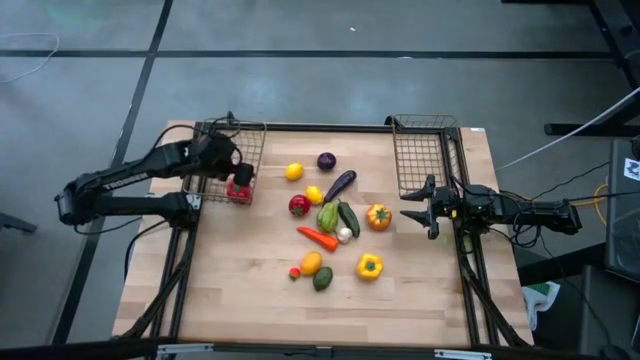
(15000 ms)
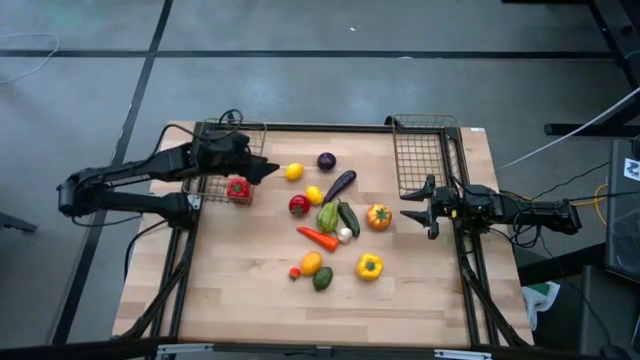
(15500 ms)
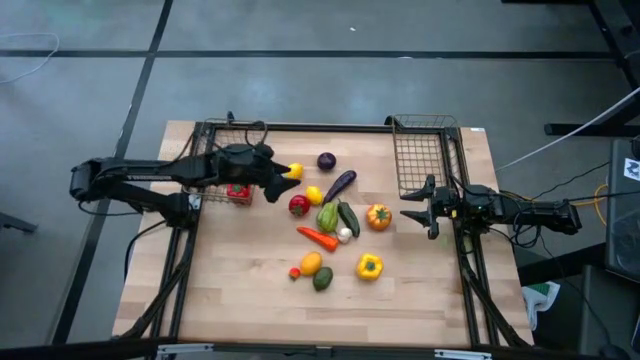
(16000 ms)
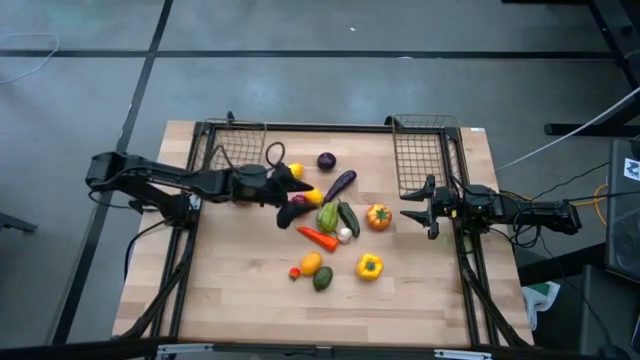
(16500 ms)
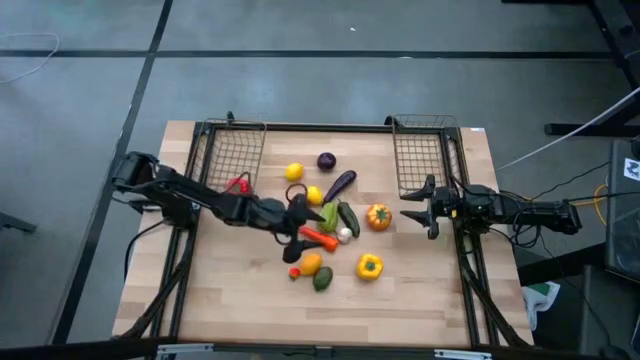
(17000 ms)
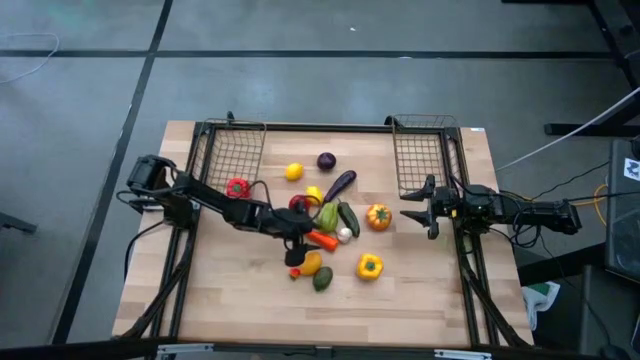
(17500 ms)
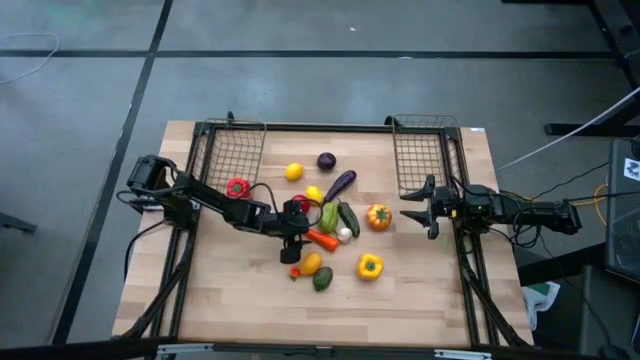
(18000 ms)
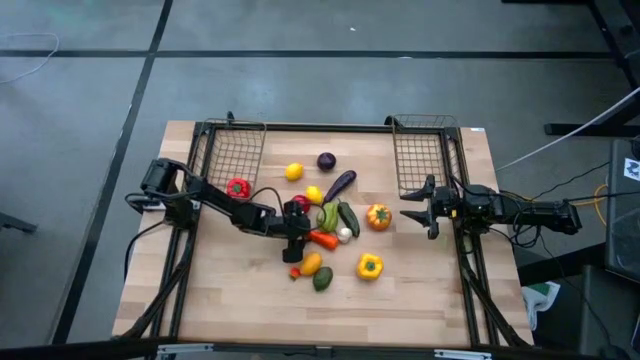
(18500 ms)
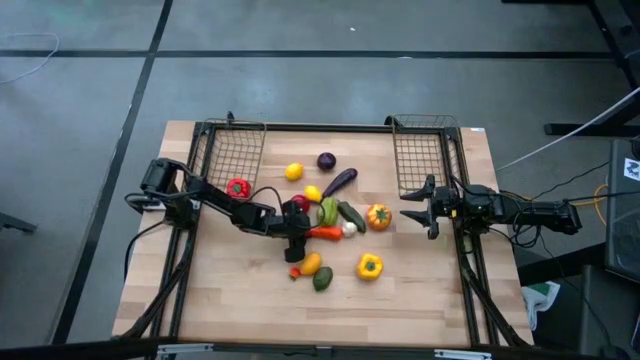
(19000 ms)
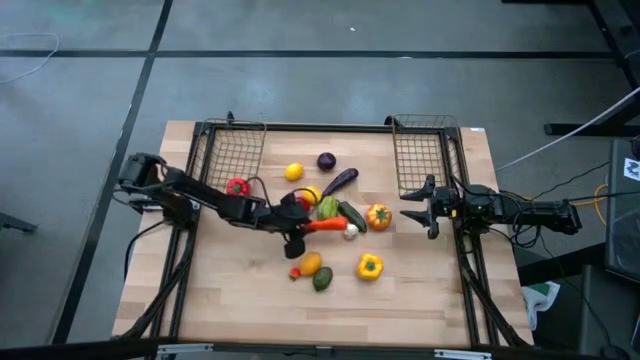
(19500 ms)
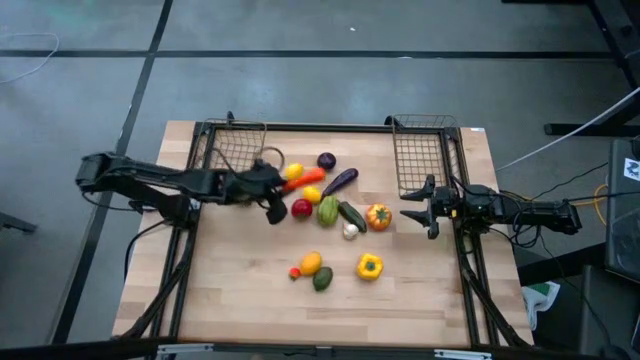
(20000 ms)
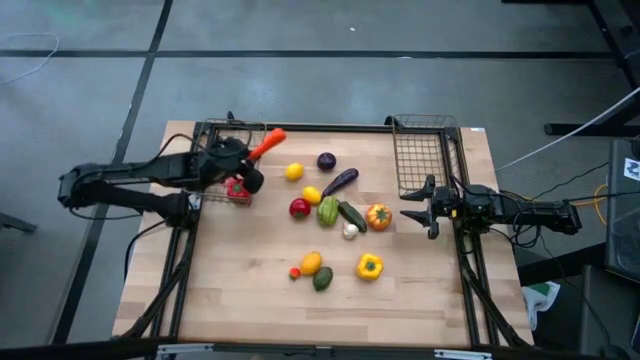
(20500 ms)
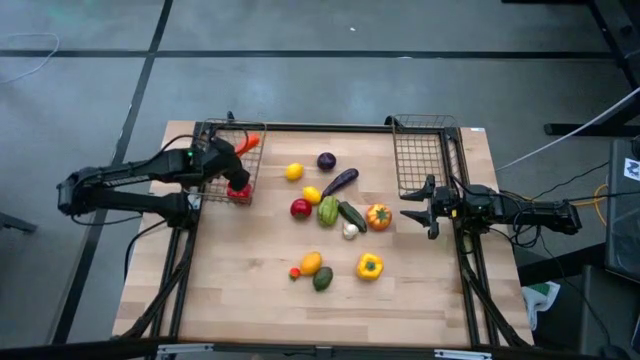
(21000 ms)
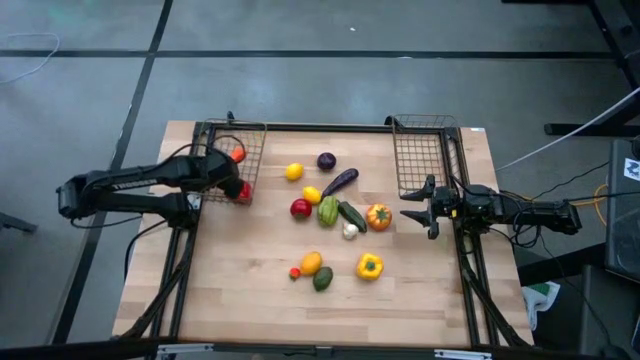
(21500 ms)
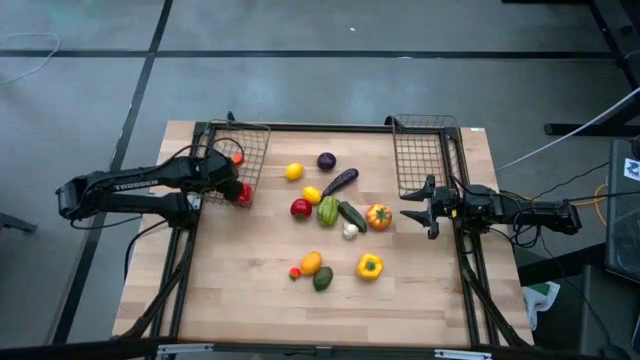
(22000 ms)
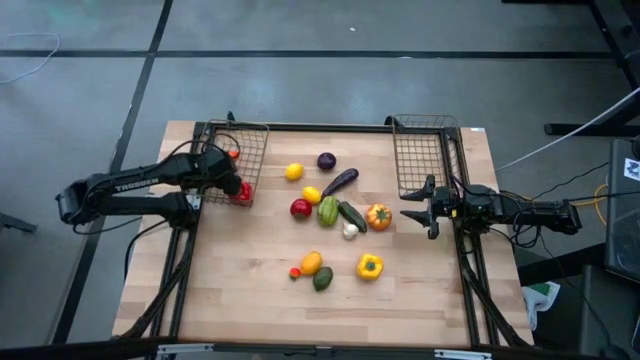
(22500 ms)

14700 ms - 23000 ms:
Task: Sort produce into baskets
Put the orange carrot into the left gold wire basket

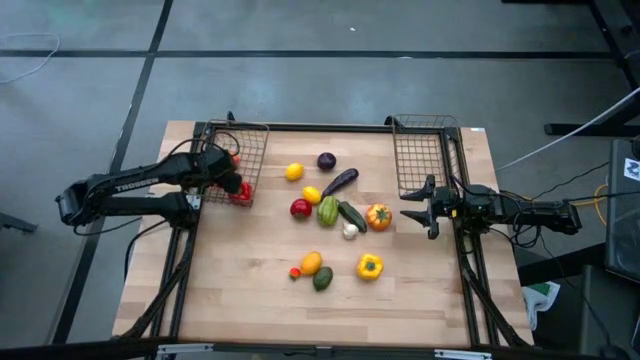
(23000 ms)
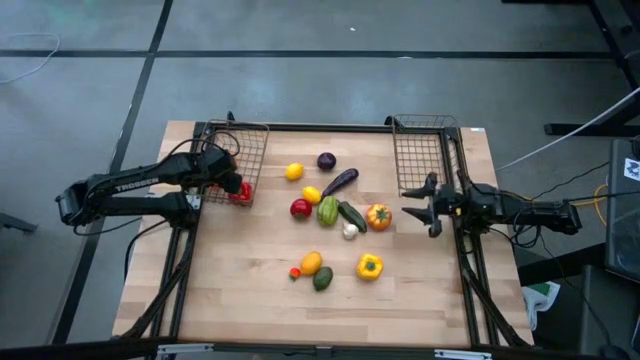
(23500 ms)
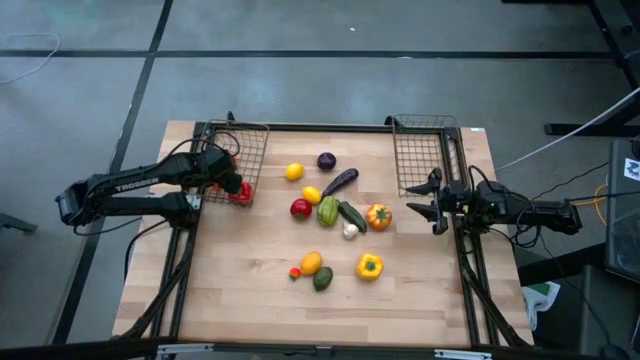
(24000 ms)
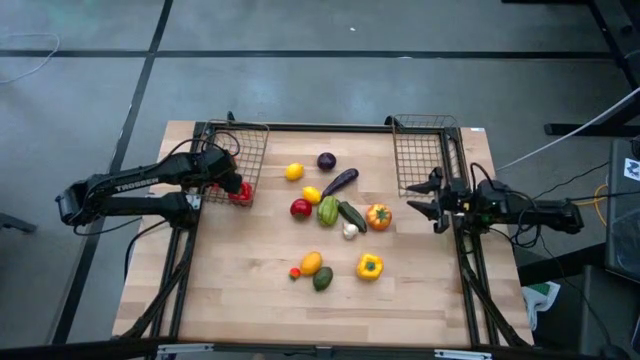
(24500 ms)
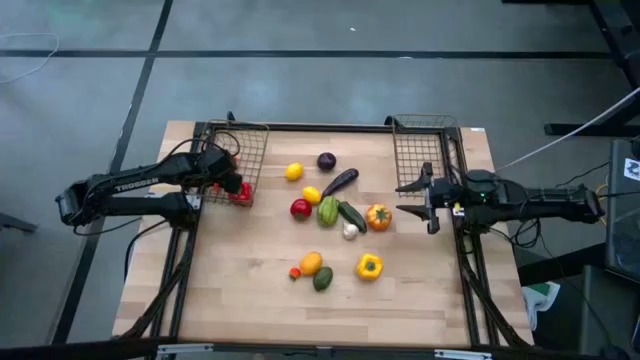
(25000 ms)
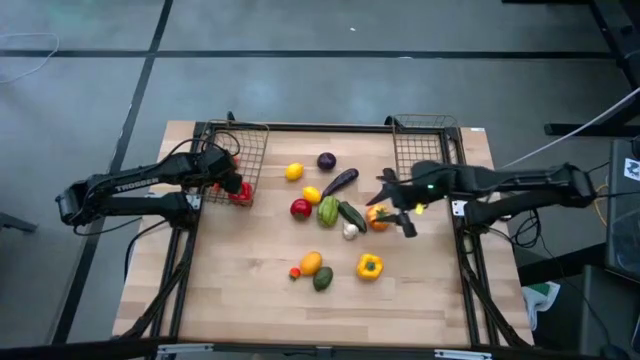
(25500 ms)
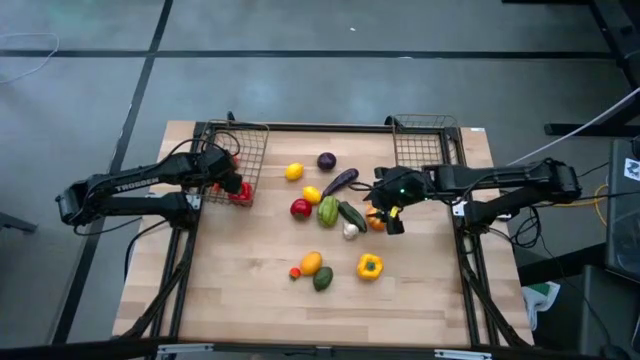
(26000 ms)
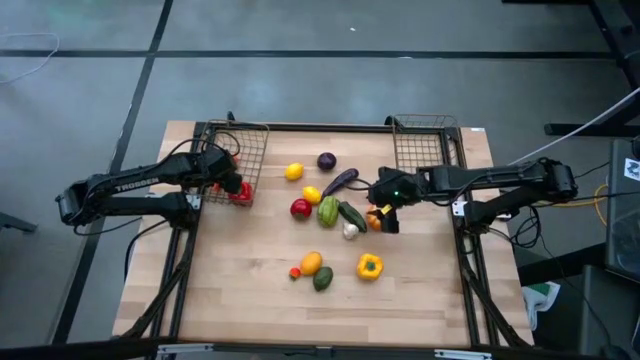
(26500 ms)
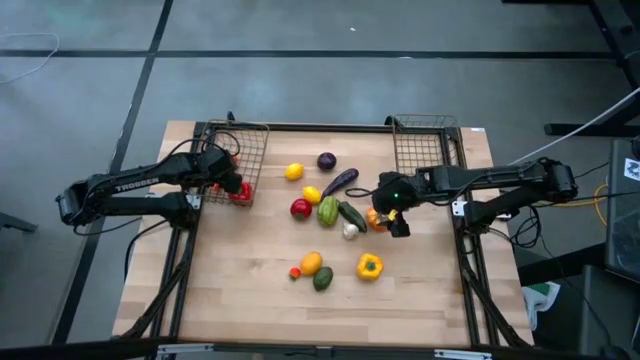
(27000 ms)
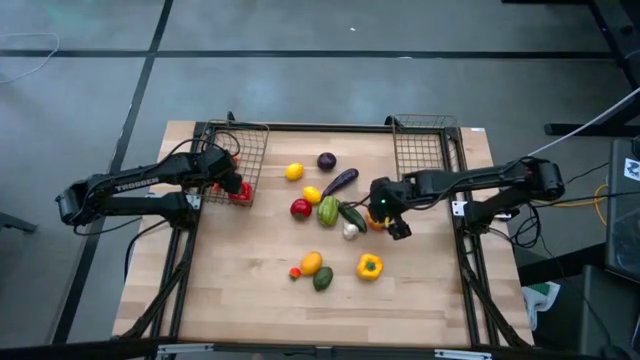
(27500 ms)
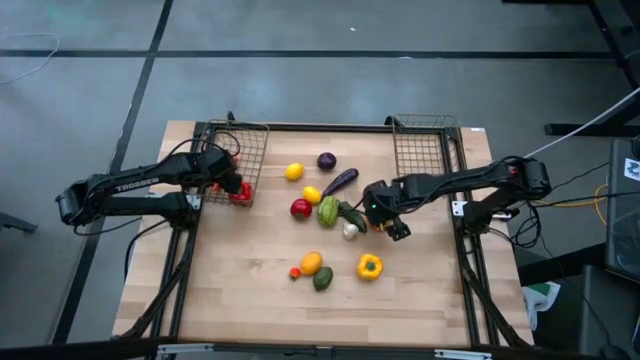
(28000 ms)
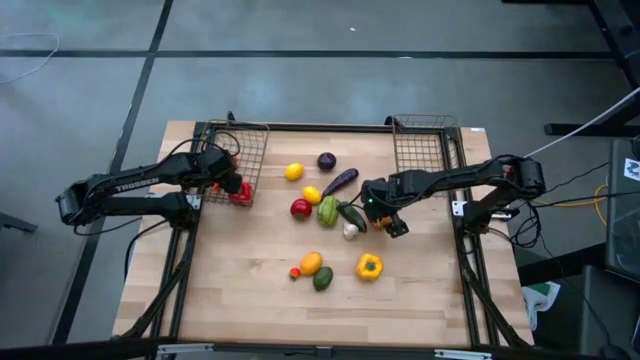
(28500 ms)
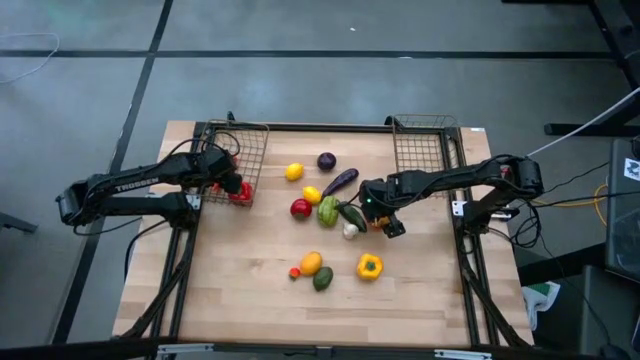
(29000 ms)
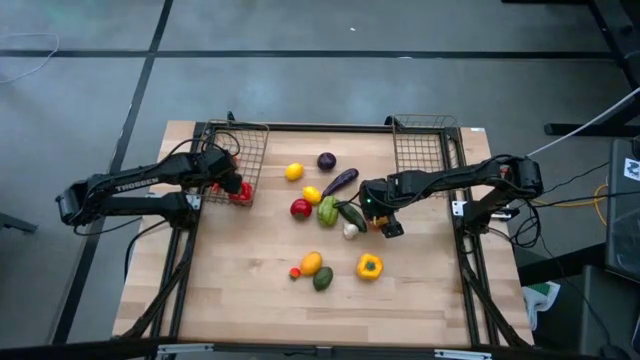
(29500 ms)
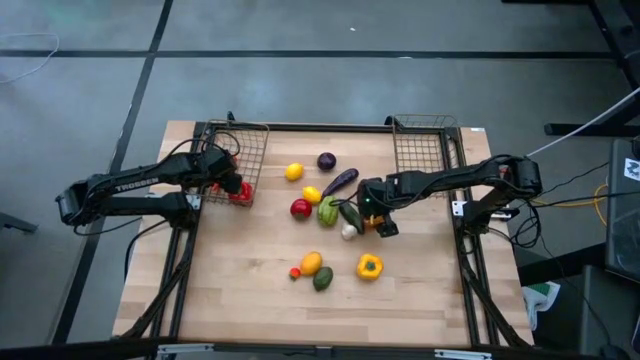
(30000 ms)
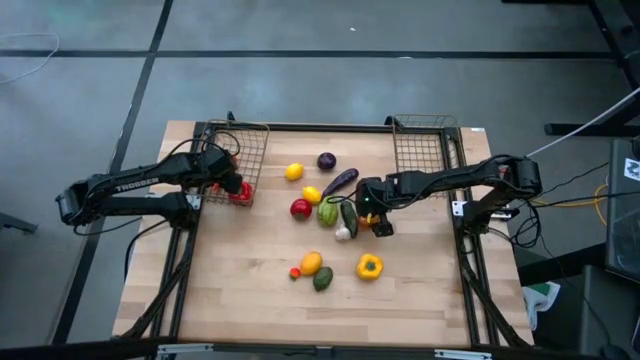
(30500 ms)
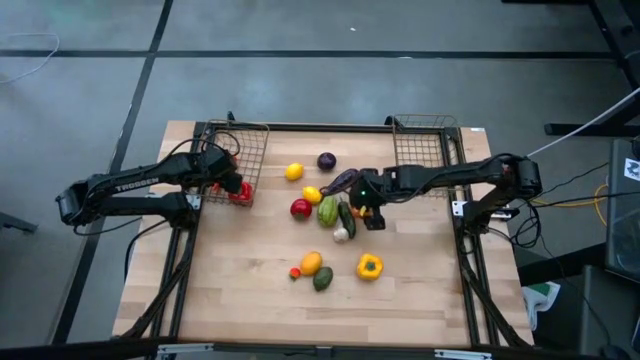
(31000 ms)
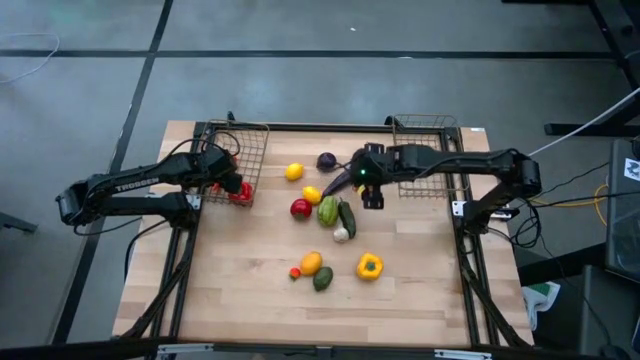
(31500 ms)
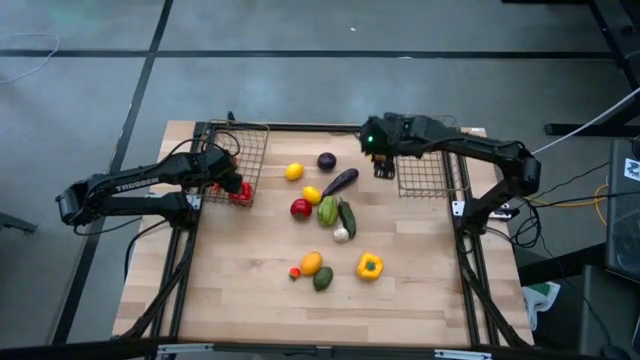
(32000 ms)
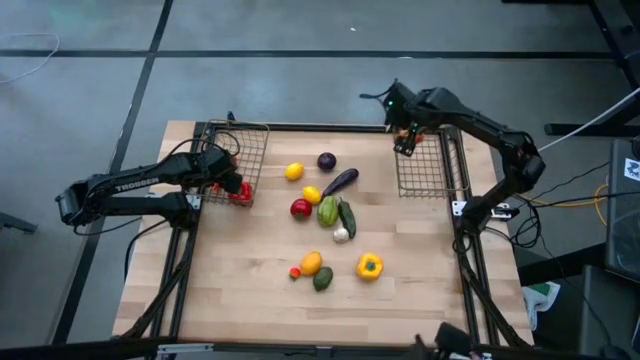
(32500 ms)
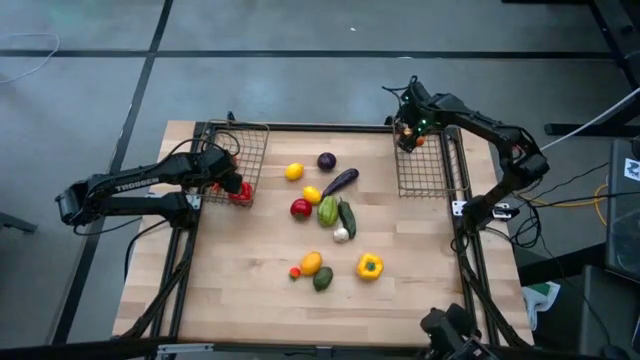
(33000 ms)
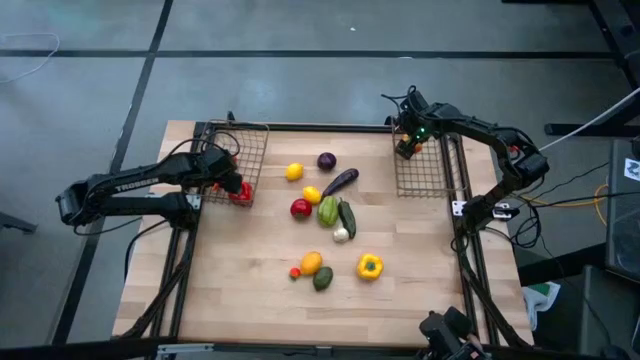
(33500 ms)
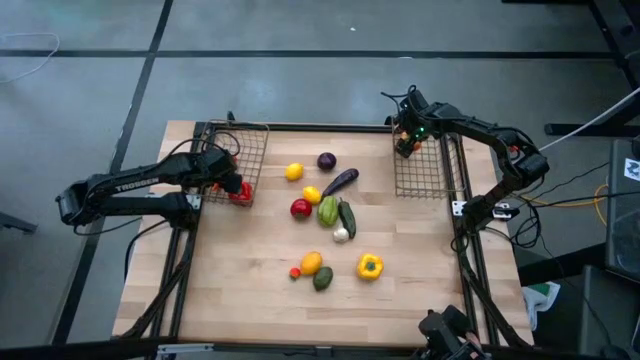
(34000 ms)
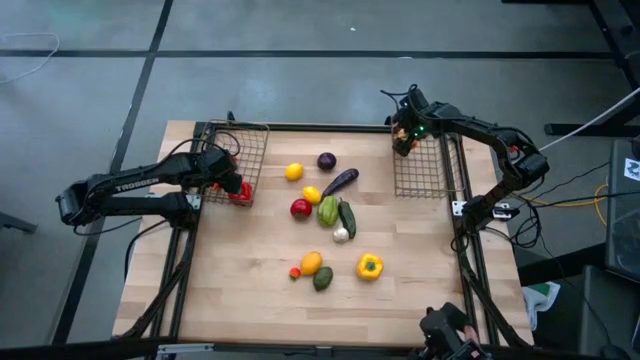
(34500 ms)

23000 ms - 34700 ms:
Put the yellow tomato into the right gold wire basket

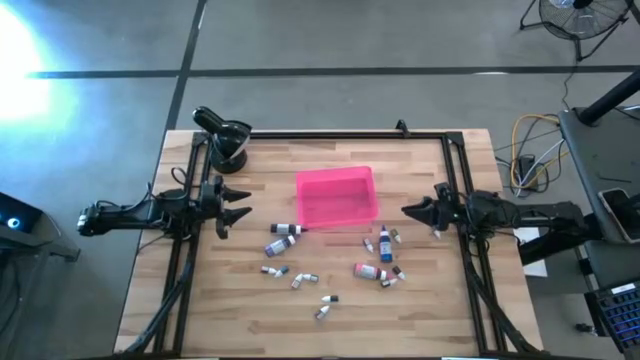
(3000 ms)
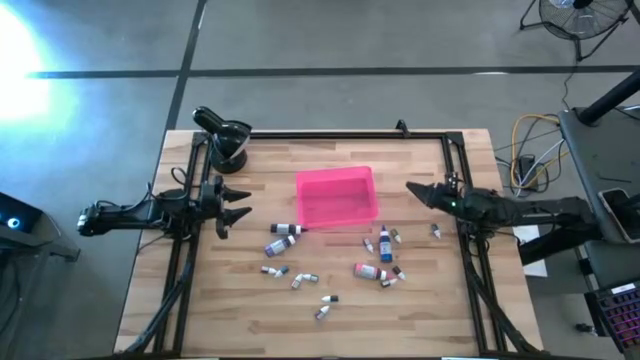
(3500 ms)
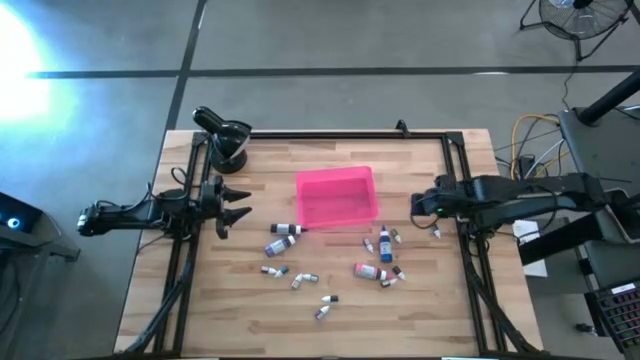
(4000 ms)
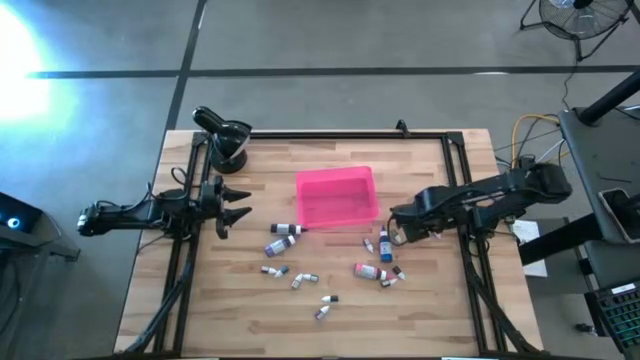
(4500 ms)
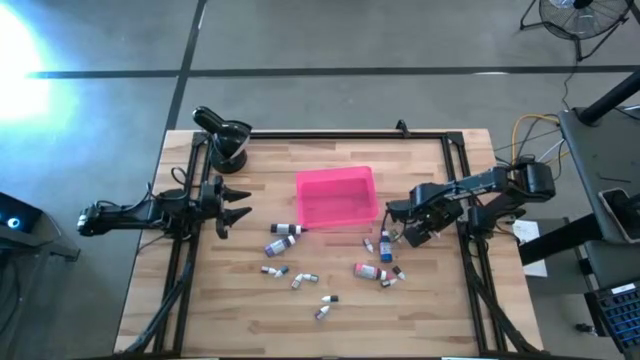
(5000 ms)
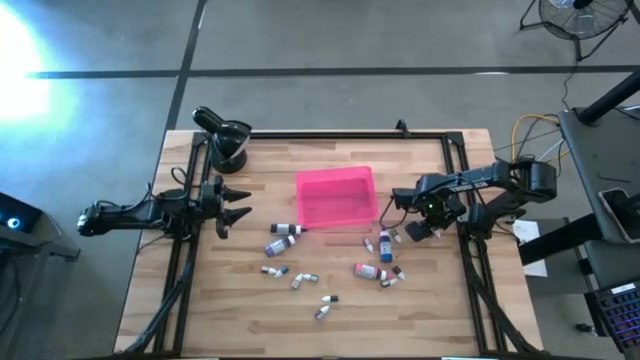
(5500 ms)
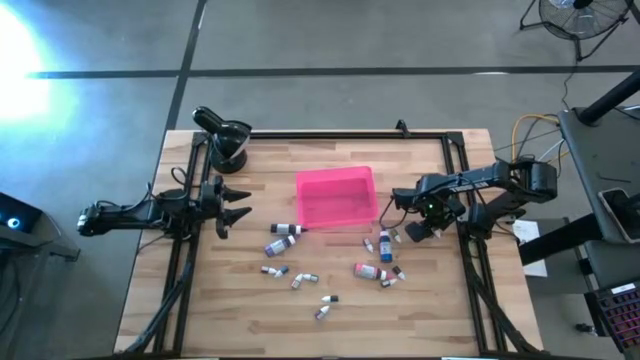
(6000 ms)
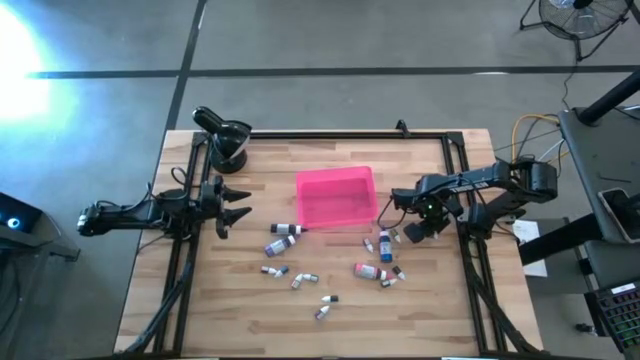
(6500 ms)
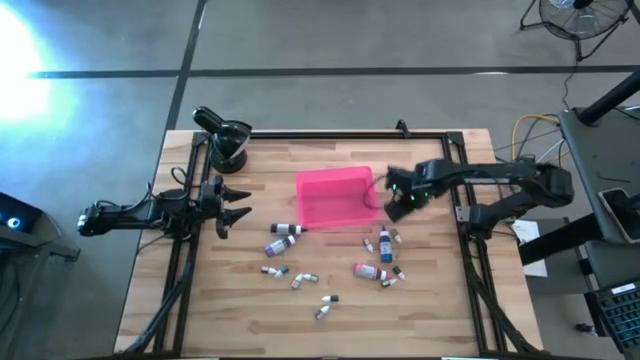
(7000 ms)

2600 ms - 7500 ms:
Task: Pick & Place food coloring
Put the small dark green food coloring bottle into the pink bin
